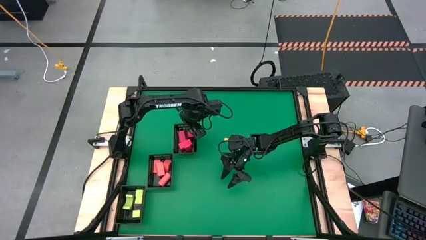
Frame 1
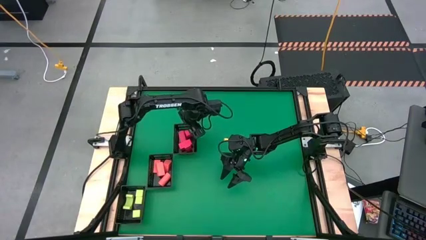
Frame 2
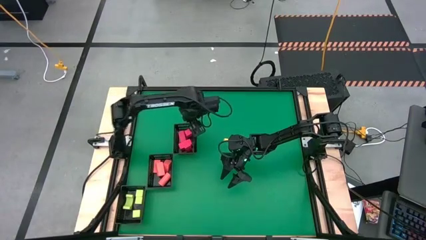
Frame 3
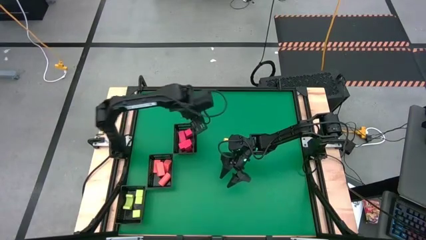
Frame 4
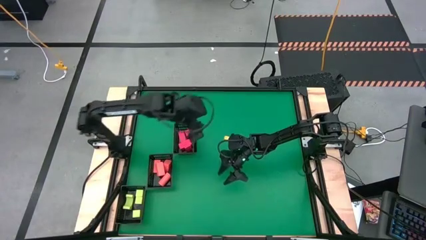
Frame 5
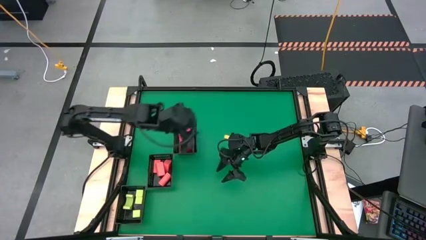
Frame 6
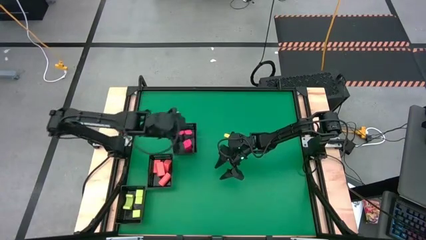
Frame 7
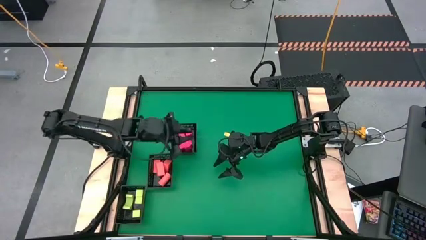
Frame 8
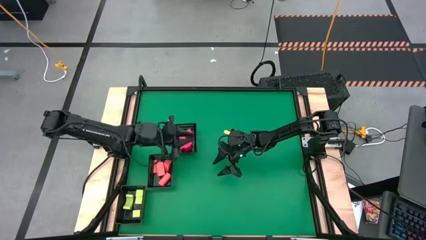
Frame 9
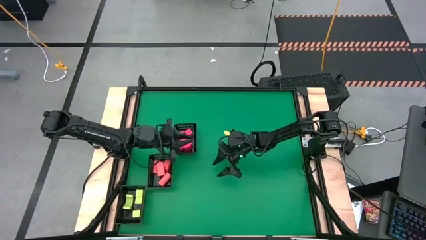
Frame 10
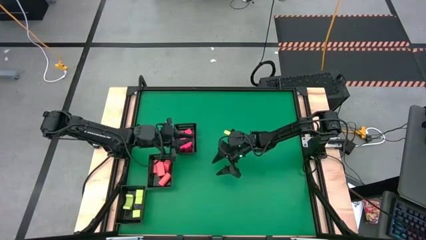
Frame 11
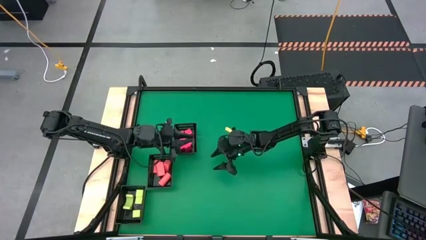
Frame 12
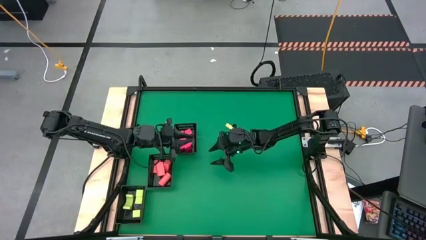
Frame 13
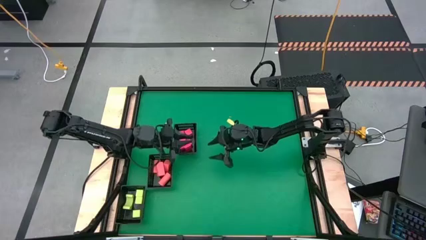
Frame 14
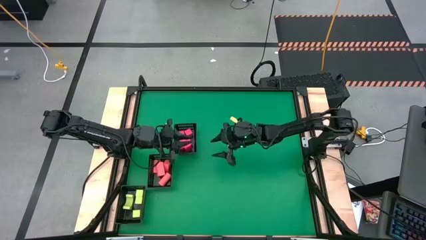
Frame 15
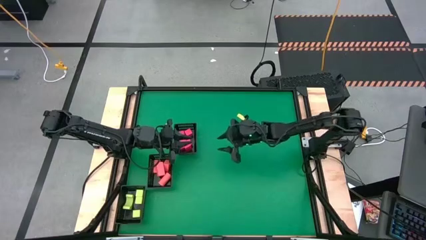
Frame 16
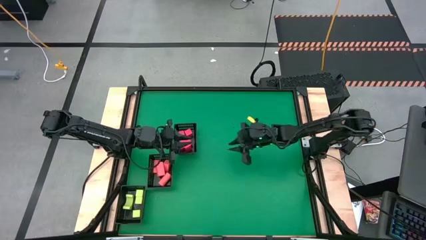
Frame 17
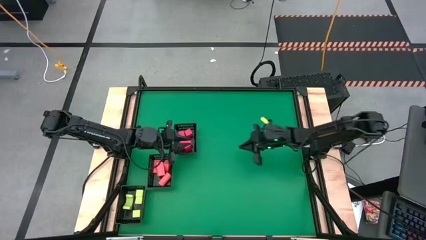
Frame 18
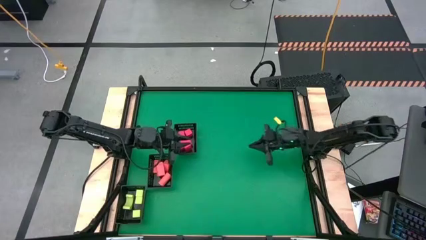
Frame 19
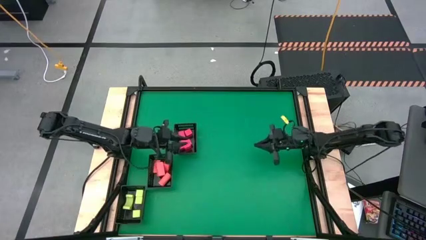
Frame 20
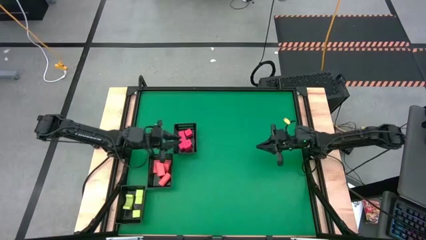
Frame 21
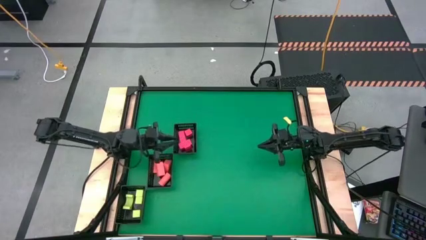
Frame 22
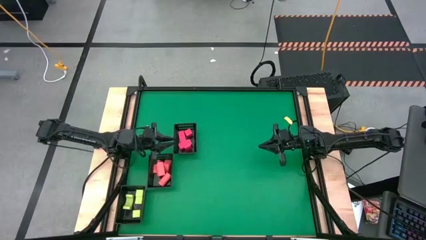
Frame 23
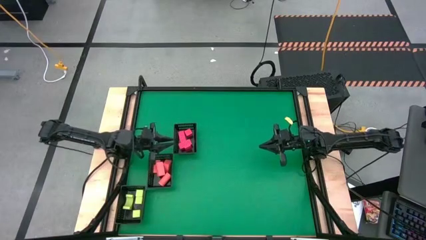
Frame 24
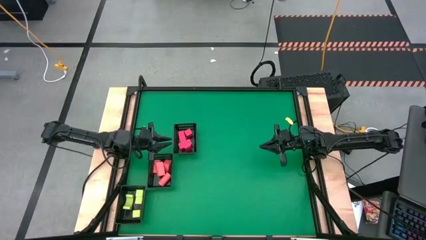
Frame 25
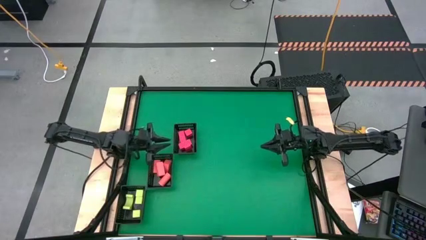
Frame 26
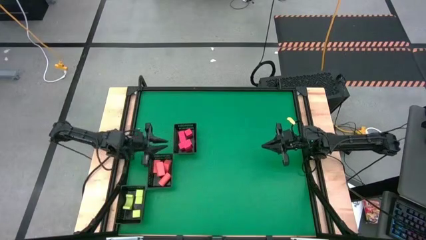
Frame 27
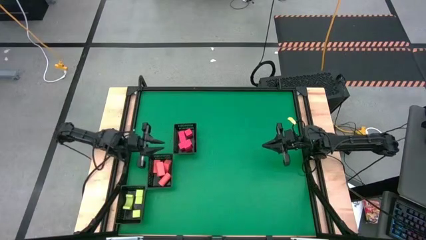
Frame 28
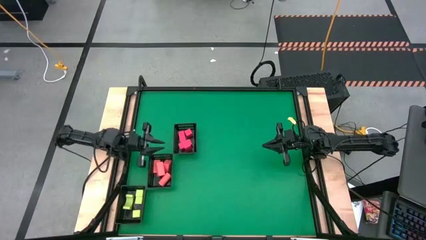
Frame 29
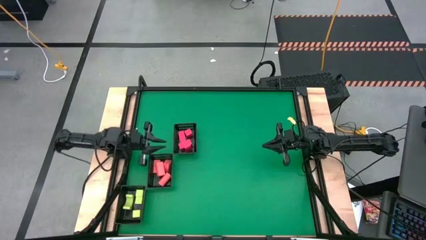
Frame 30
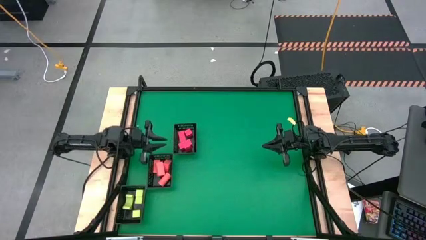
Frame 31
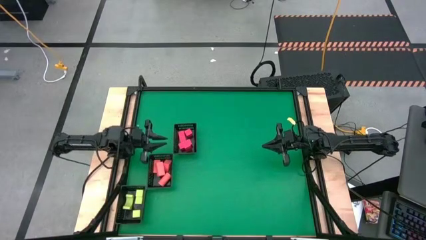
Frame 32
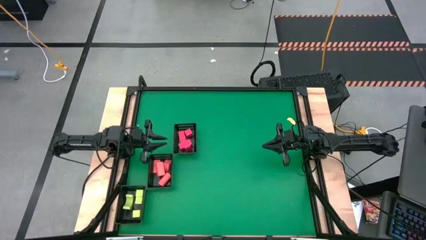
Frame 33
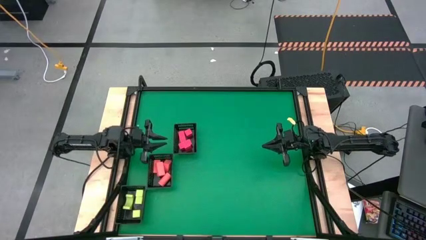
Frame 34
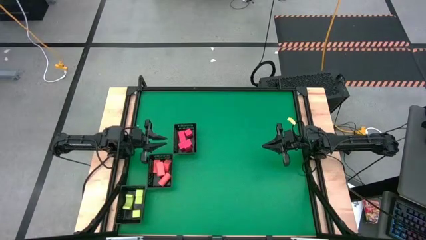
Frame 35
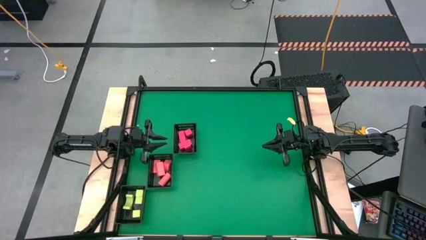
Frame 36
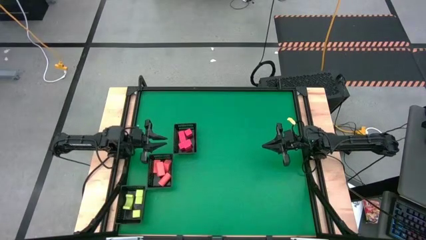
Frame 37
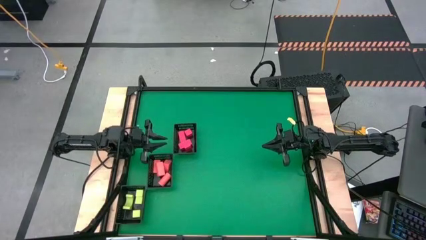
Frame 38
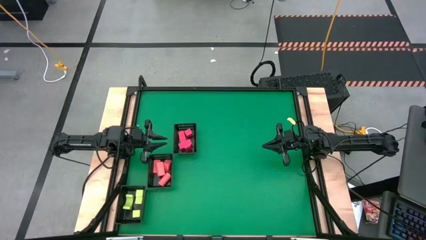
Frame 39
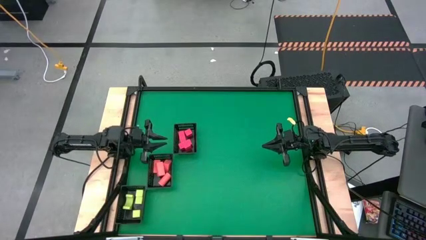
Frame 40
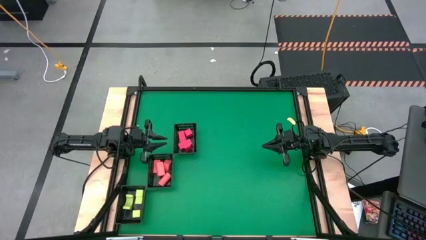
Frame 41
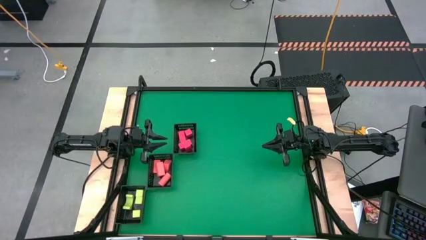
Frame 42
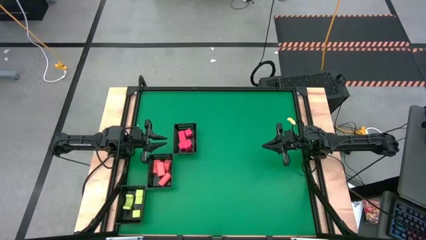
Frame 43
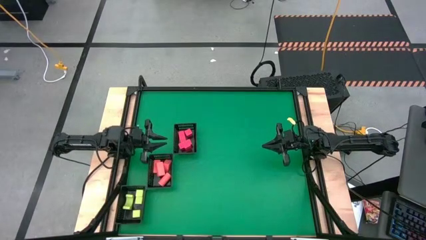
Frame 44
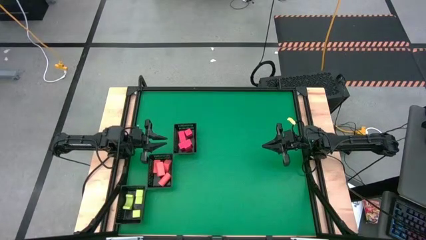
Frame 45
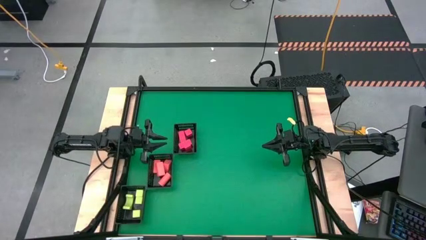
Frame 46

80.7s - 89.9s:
Task: Sort & place blocks by color
Return to Home Position

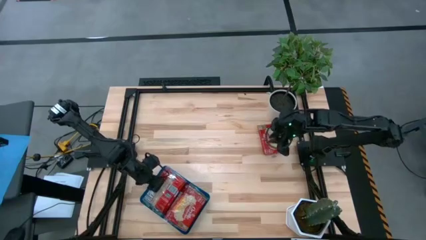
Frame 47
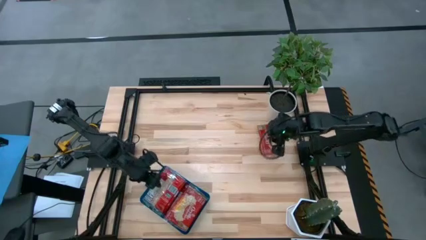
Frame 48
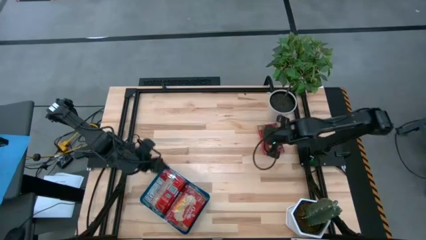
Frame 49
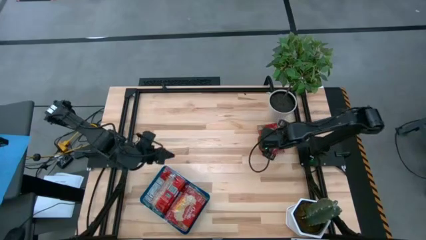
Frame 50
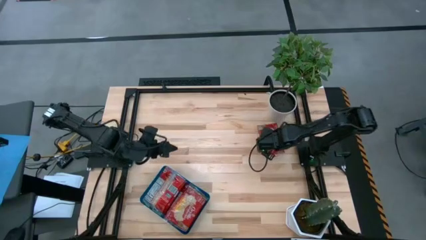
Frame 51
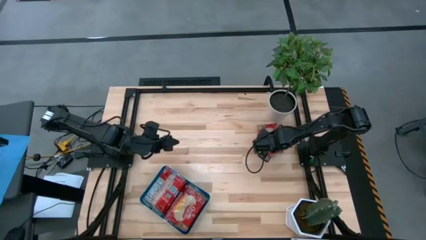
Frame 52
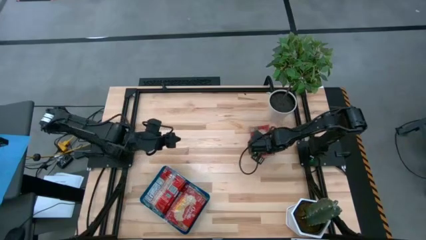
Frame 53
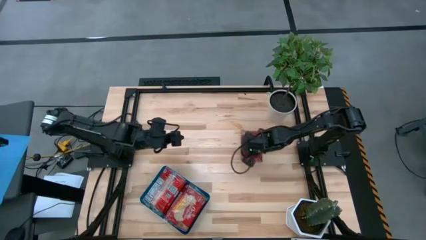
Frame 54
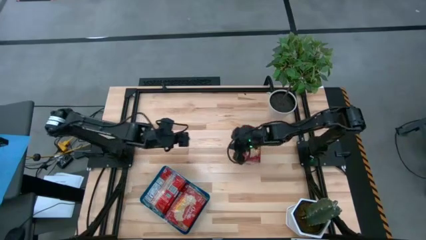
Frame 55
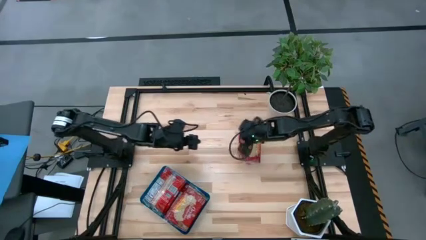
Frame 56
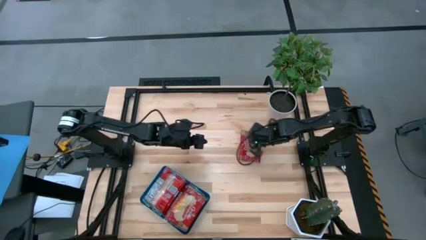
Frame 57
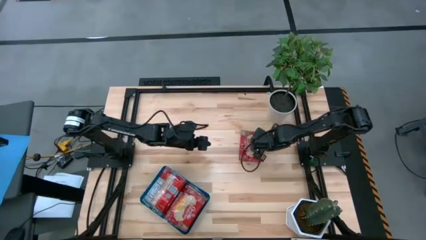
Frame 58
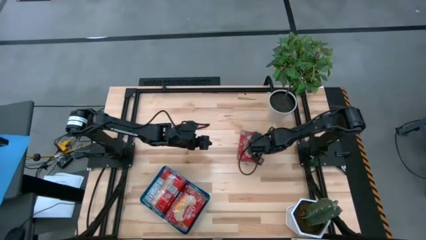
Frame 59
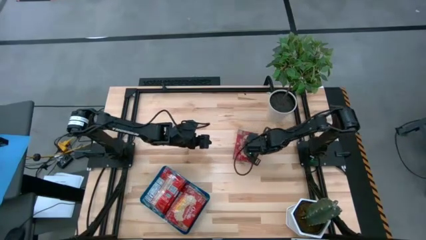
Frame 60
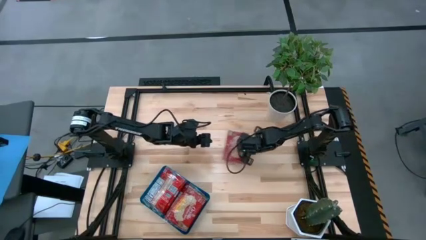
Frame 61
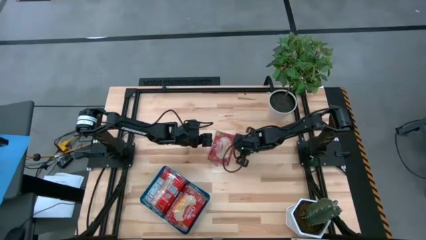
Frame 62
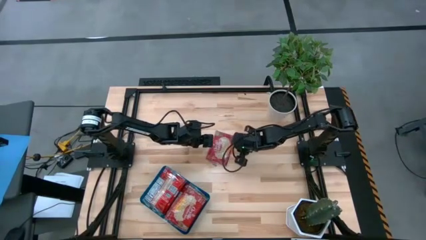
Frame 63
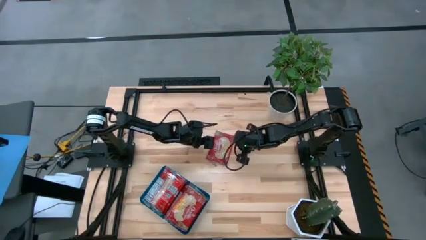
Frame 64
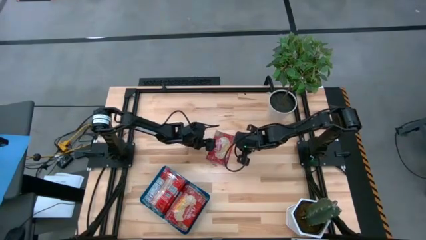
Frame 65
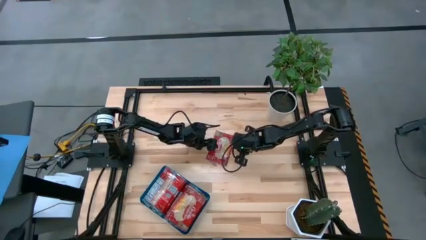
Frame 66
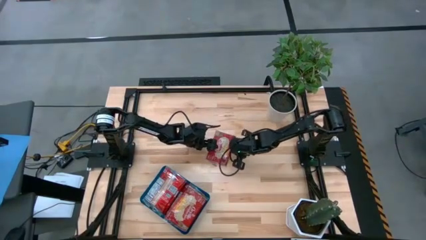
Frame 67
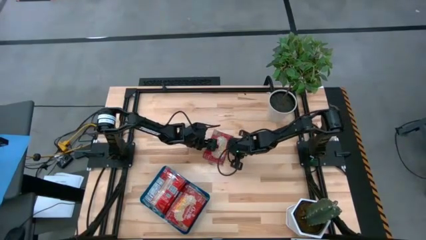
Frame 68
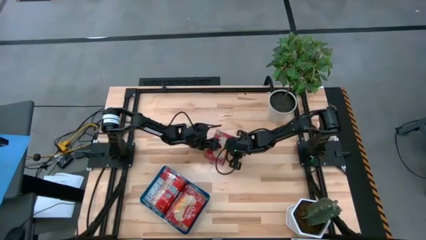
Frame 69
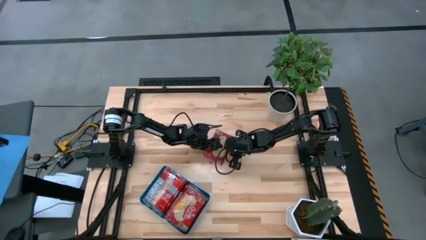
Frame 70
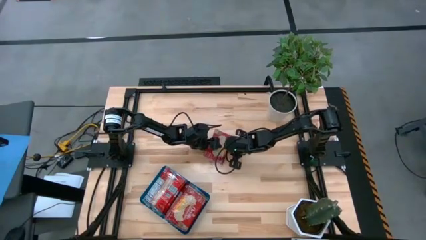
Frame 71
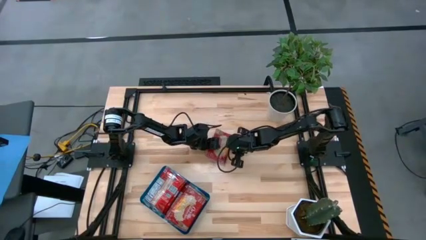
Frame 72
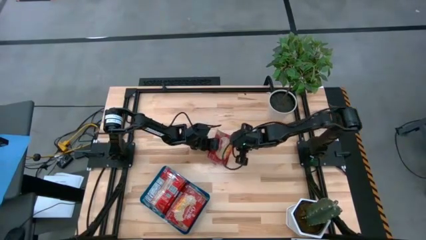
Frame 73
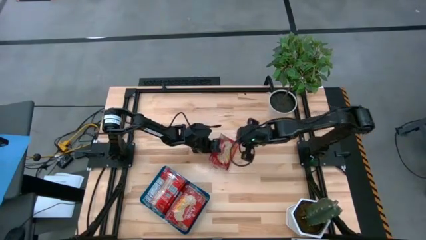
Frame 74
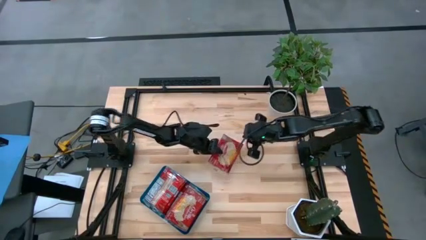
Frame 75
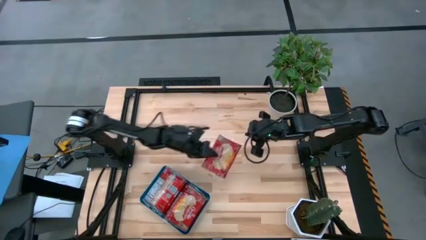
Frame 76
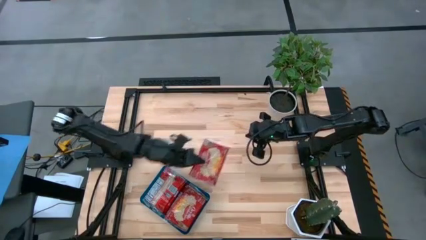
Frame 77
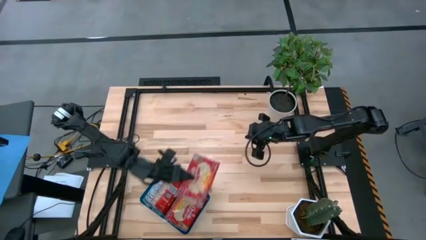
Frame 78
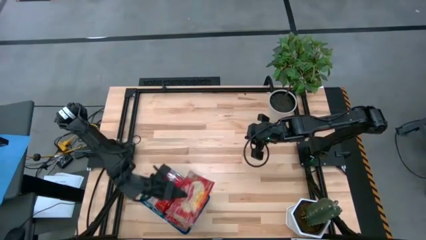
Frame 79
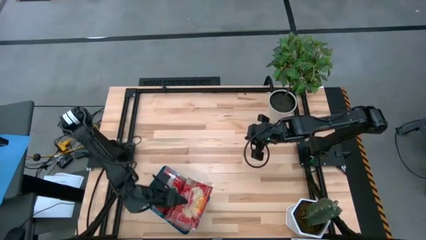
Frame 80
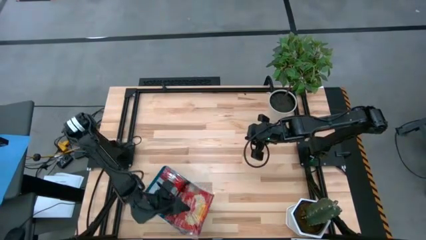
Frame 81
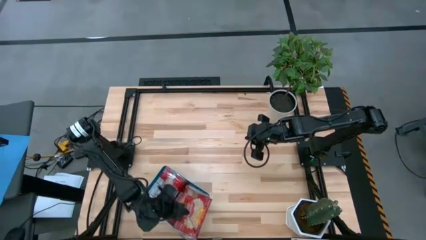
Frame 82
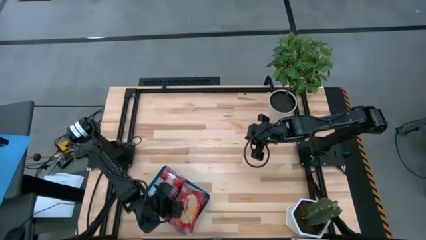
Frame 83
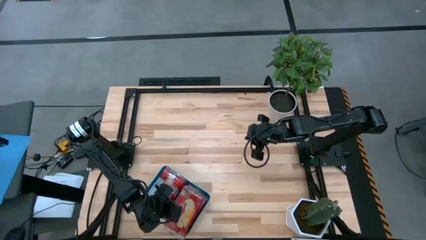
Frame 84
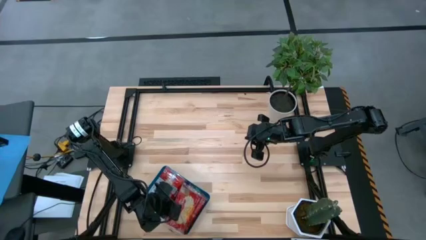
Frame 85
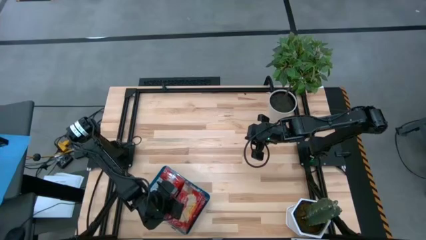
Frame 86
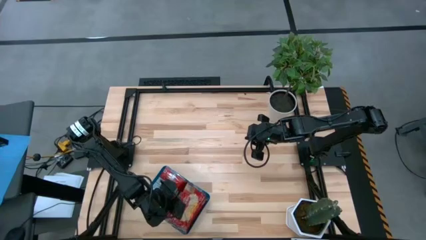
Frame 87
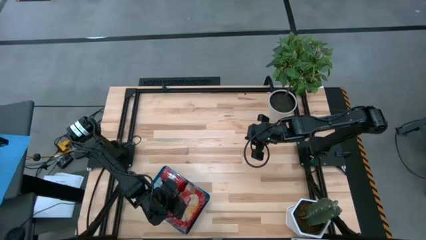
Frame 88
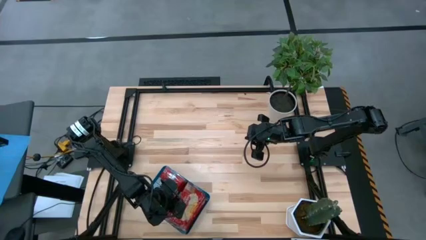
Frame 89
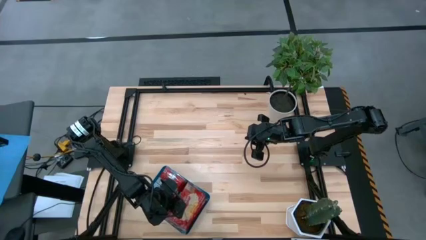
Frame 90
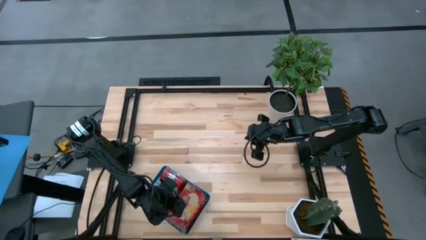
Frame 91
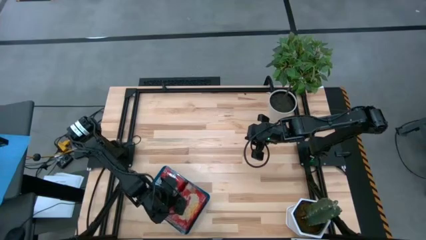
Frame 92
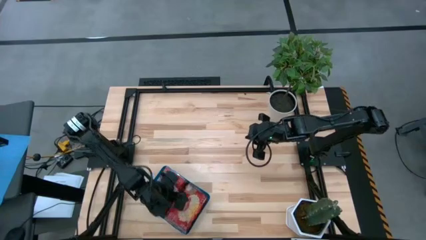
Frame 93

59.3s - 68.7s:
Task: Sort popcorn bags into baskets
Put the red popcorn bag into the blue bin
